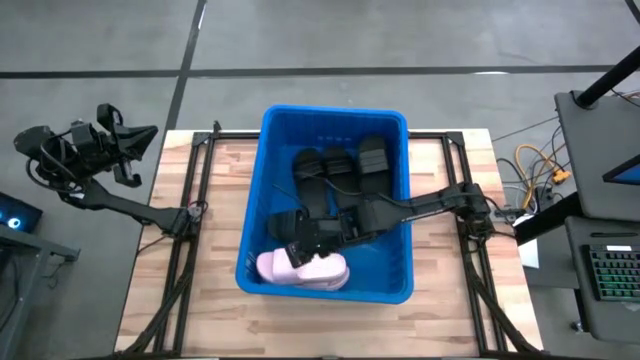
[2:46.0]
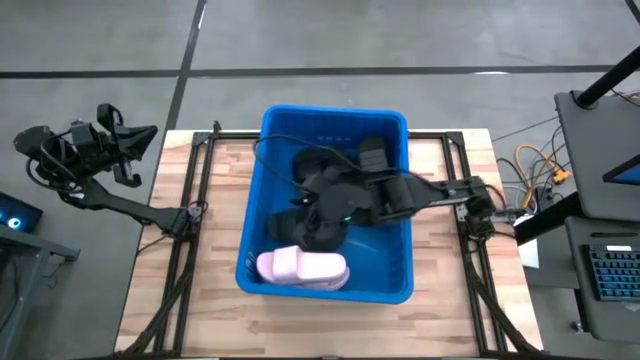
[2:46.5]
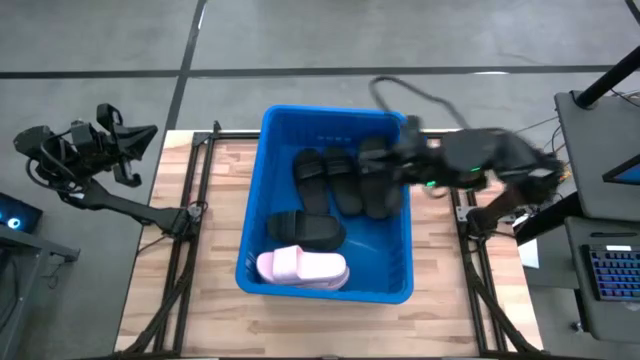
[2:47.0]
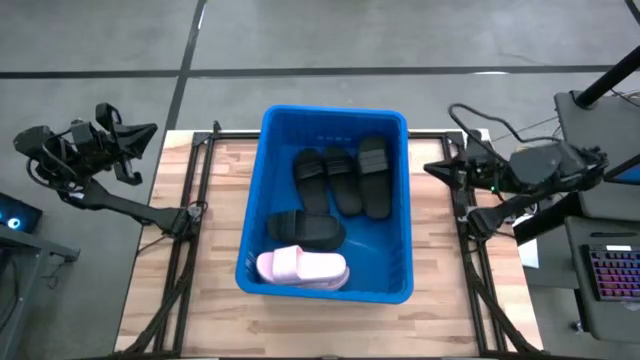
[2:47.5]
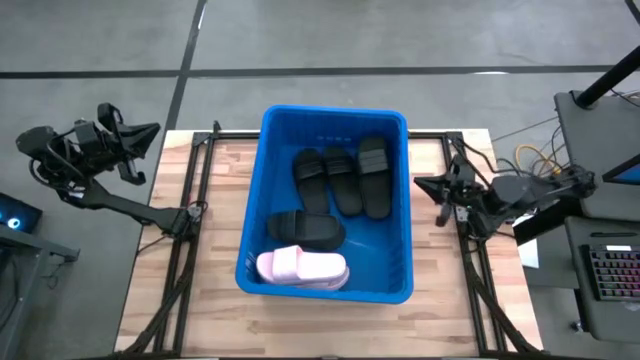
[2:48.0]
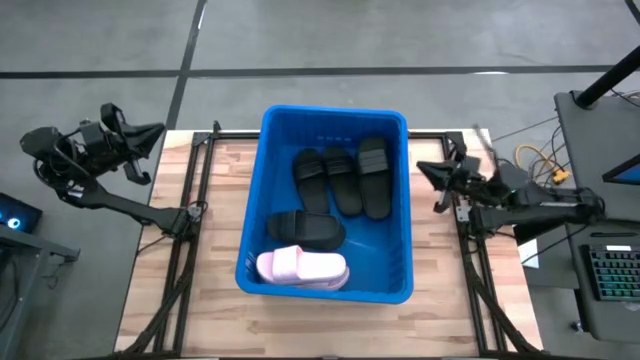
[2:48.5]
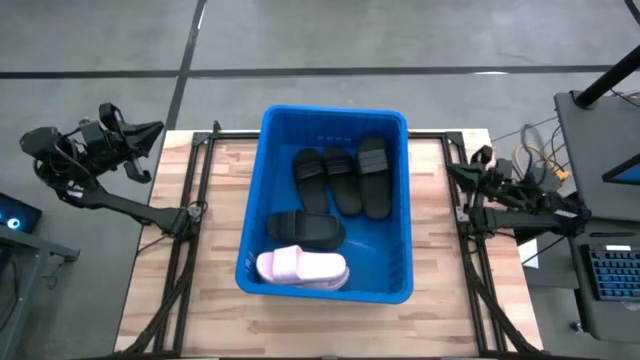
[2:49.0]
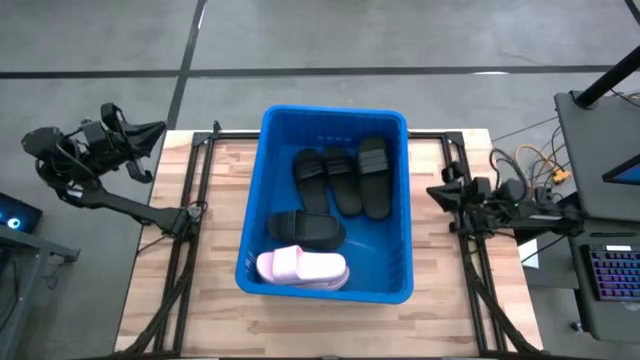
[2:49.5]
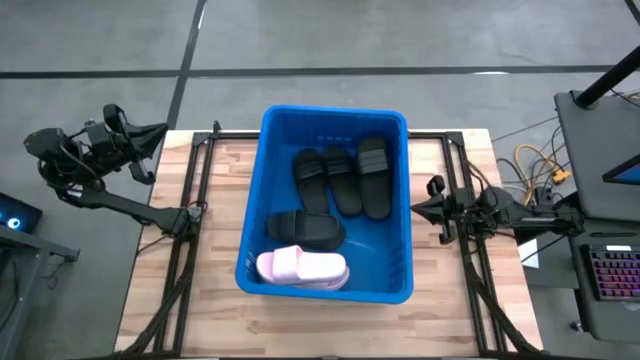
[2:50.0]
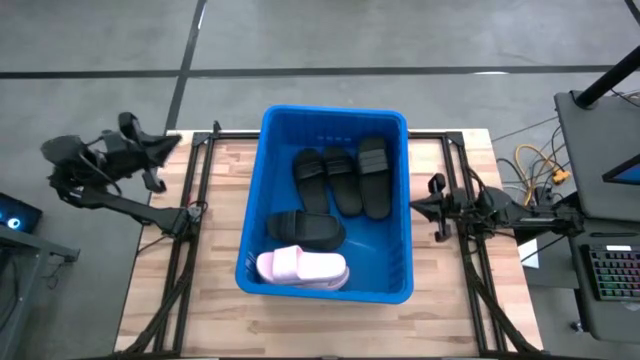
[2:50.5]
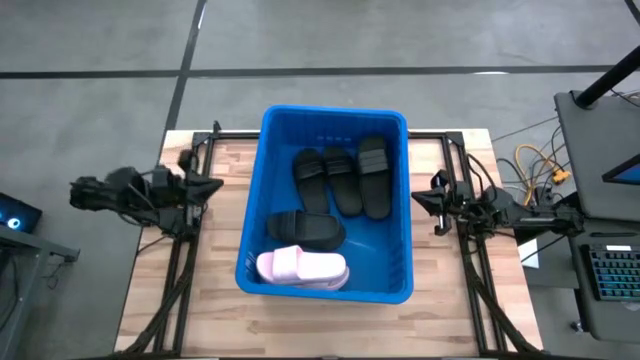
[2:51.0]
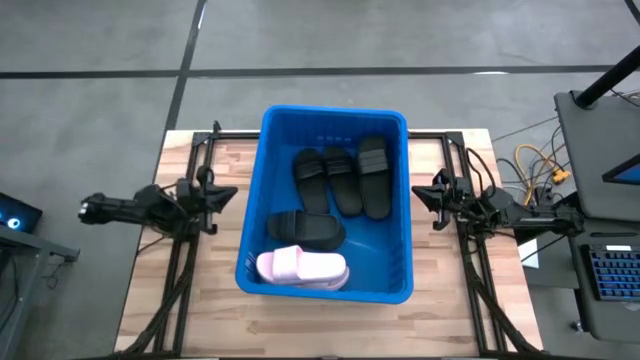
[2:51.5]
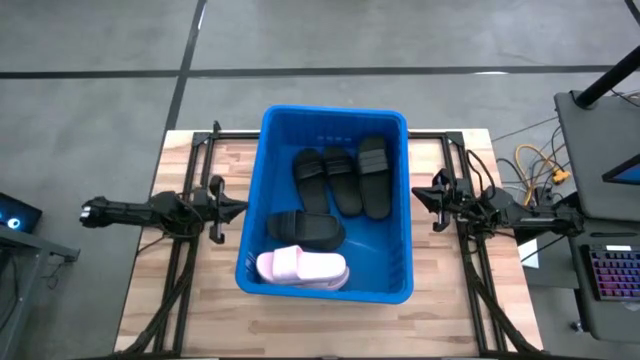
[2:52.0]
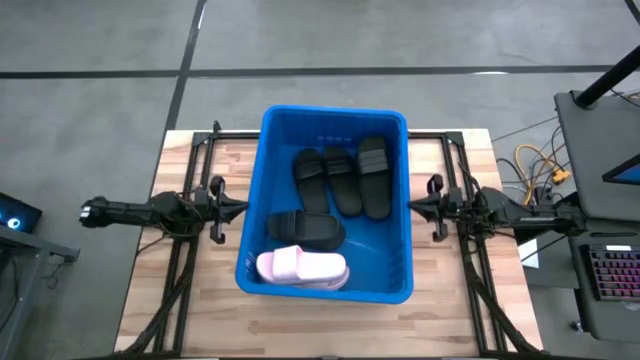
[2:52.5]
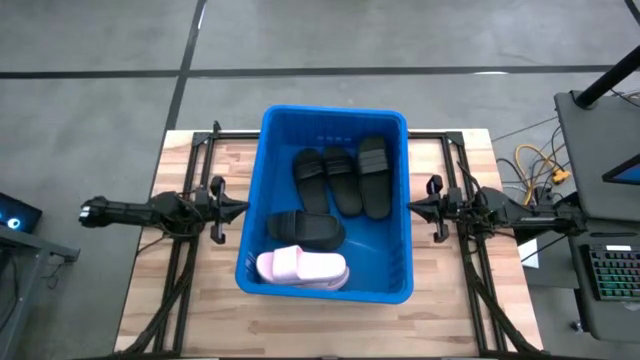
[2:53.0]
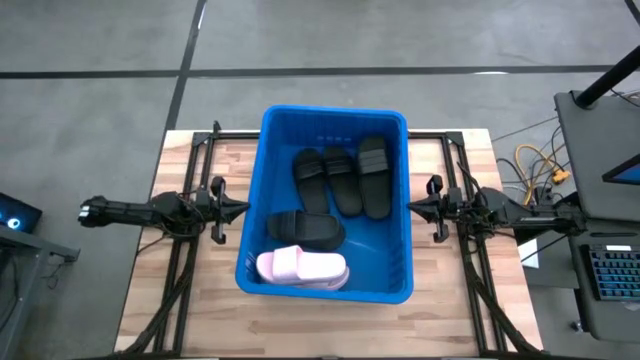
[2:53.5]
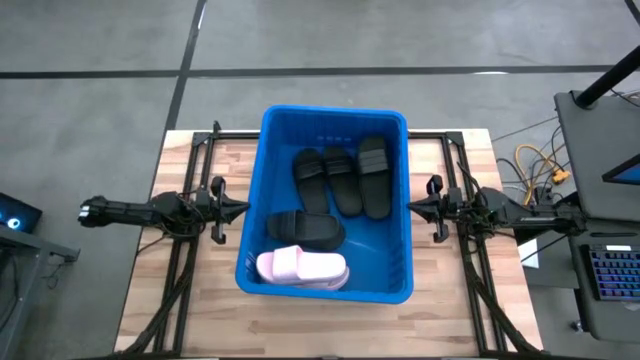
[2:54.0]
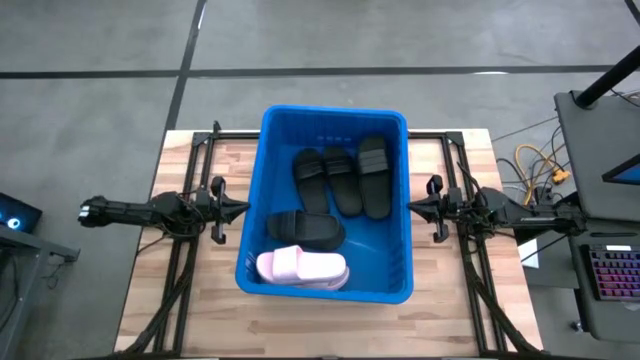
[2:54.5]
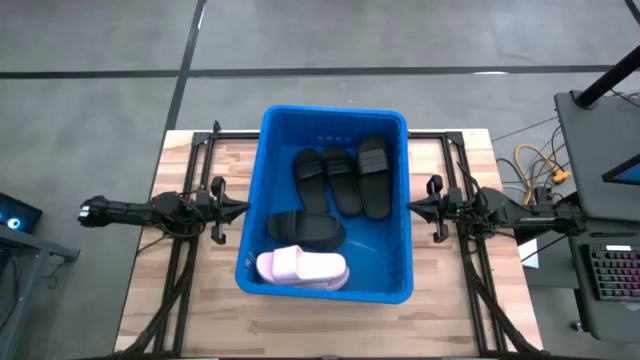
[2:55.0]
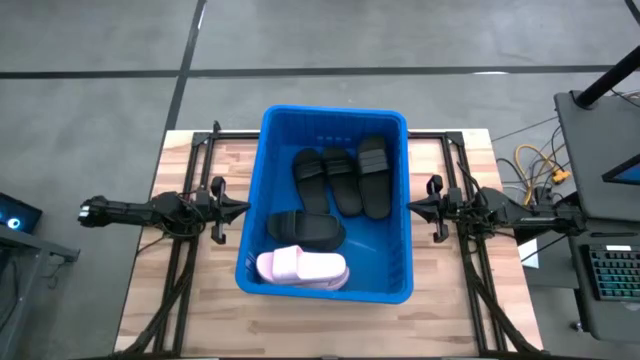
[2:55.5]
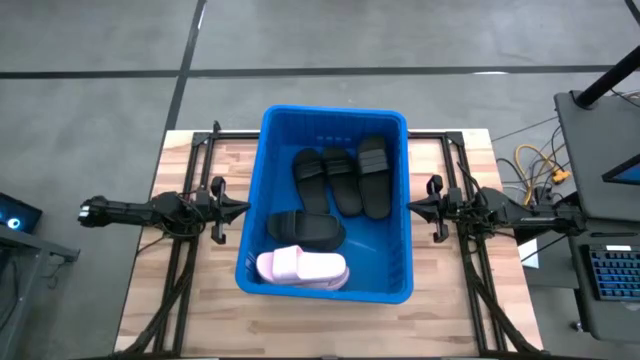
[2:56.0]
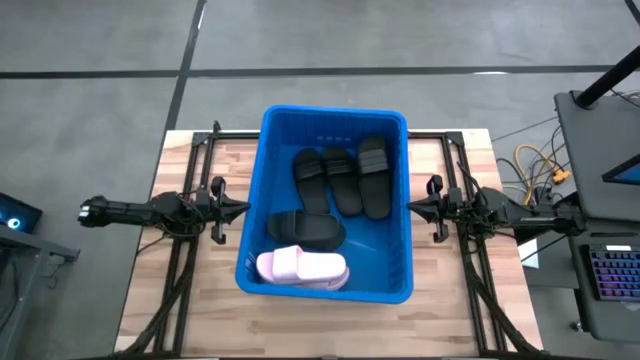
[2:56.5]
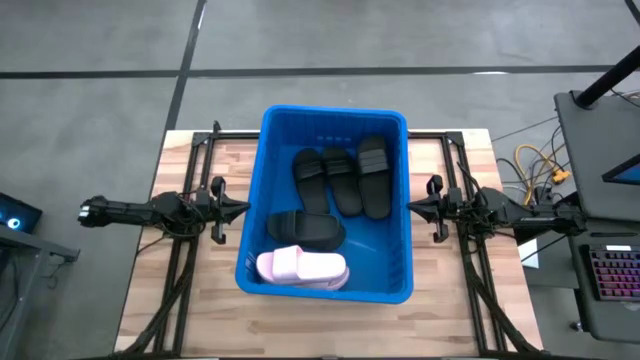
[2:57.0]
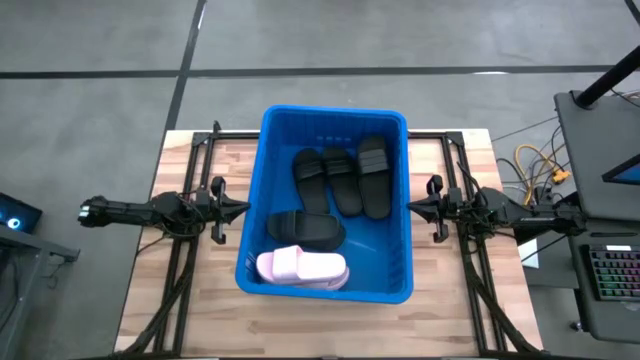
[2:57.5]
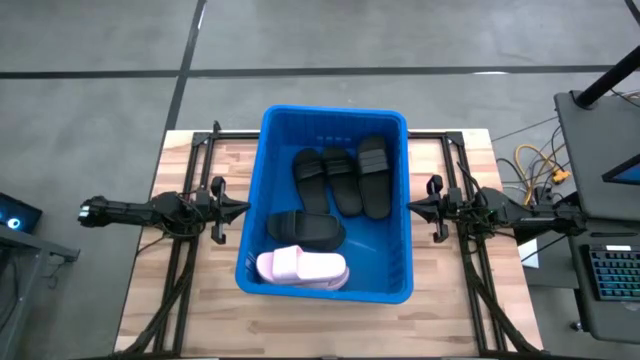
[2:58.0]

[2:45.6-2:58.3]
Task: Pick and place slides into bin
Return to Home Position
